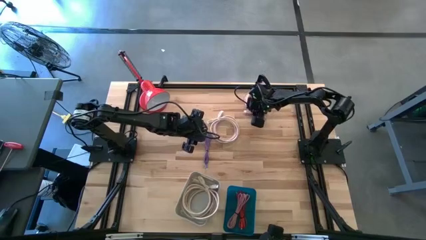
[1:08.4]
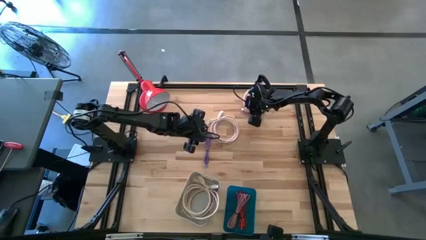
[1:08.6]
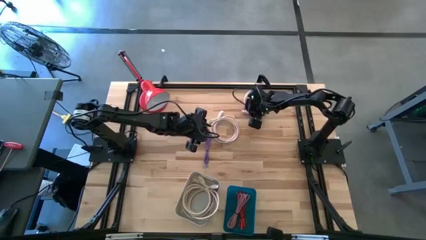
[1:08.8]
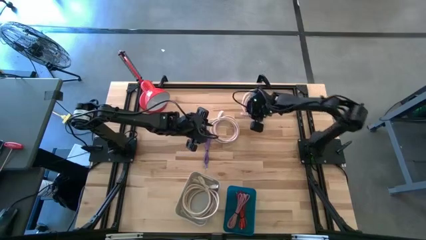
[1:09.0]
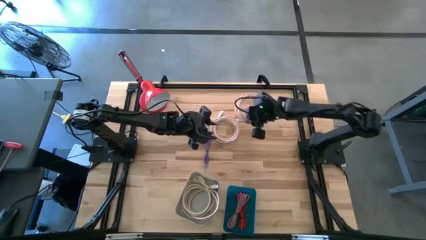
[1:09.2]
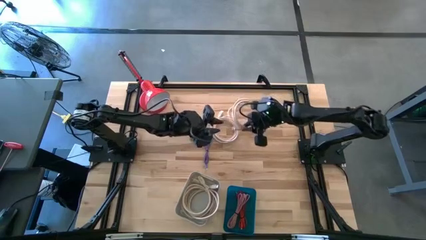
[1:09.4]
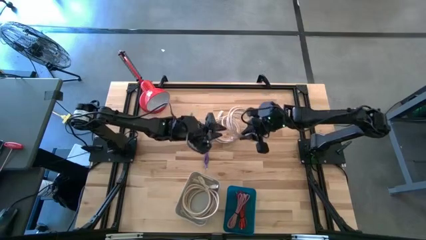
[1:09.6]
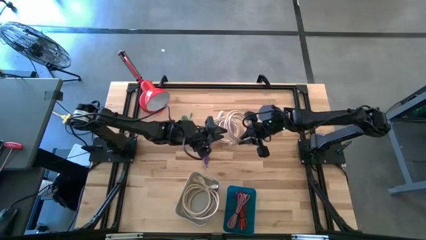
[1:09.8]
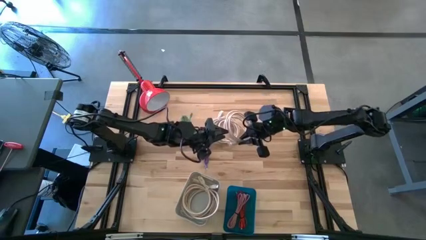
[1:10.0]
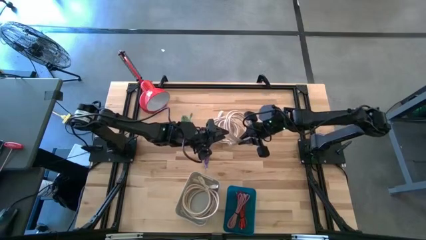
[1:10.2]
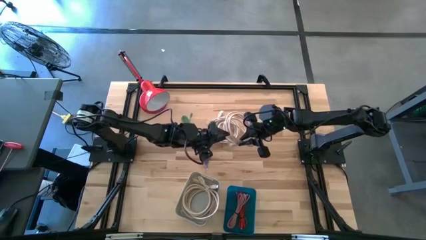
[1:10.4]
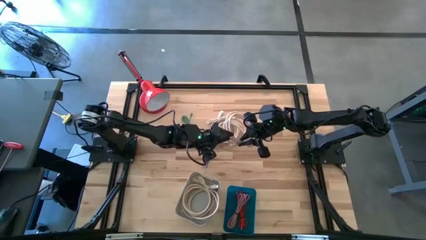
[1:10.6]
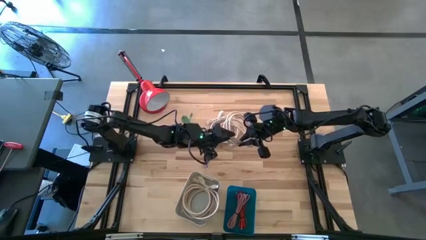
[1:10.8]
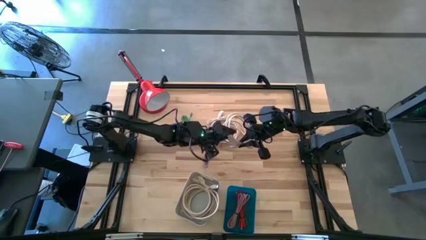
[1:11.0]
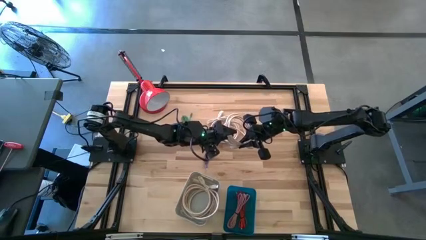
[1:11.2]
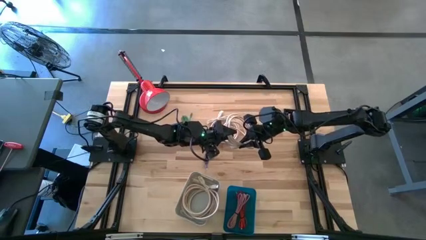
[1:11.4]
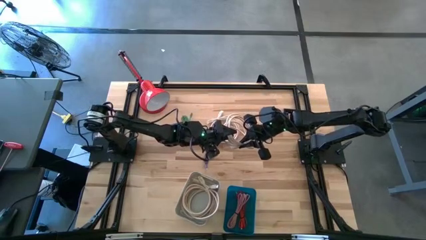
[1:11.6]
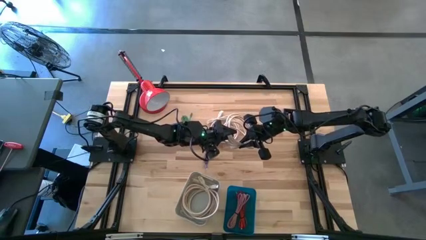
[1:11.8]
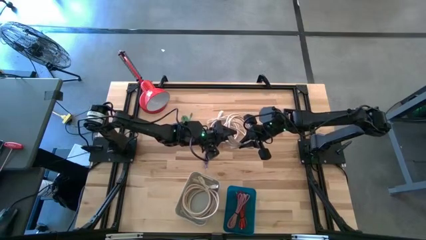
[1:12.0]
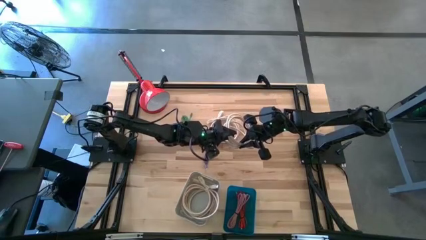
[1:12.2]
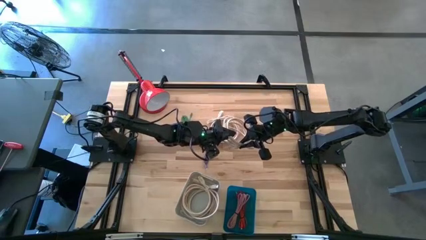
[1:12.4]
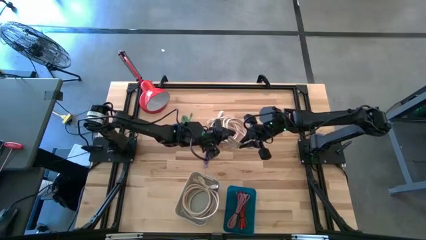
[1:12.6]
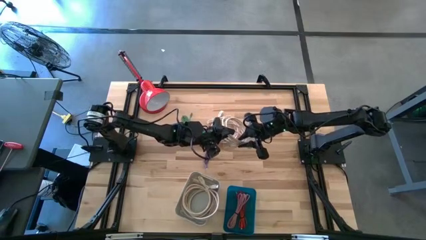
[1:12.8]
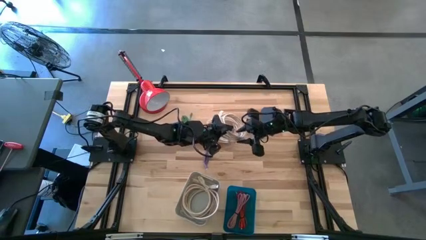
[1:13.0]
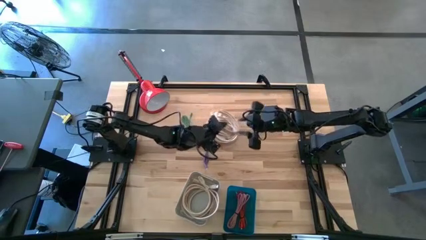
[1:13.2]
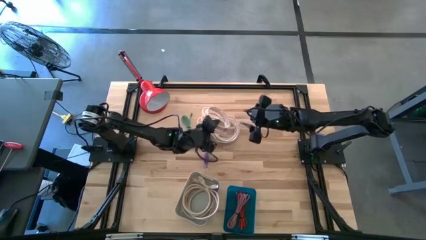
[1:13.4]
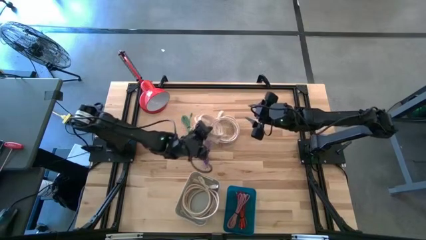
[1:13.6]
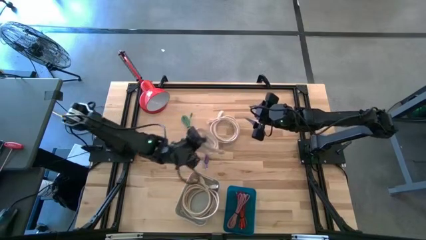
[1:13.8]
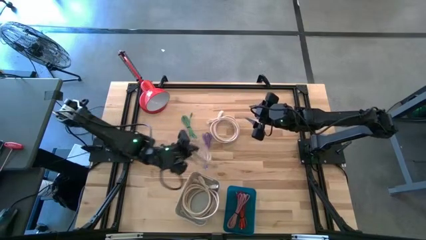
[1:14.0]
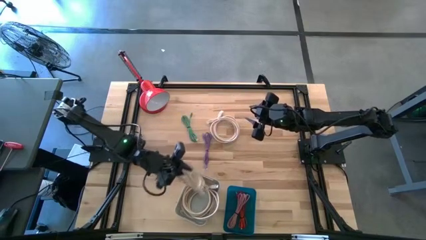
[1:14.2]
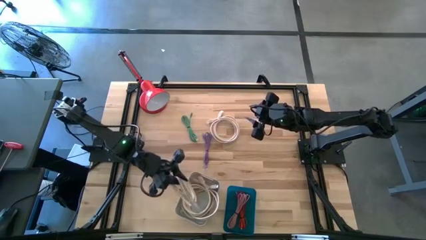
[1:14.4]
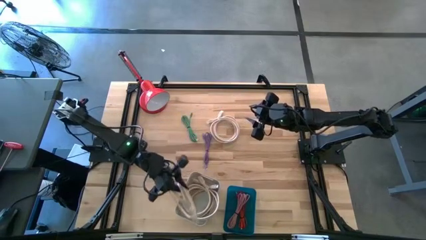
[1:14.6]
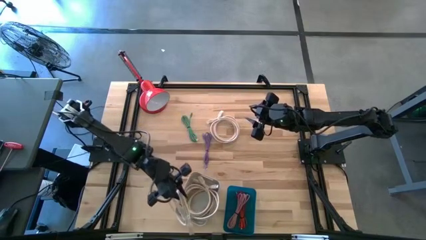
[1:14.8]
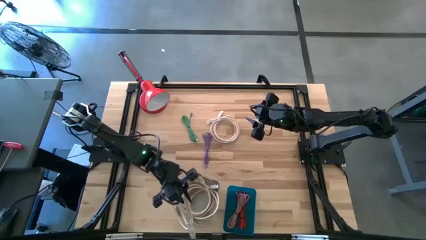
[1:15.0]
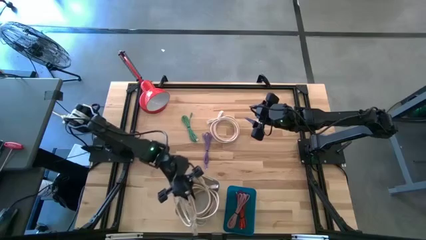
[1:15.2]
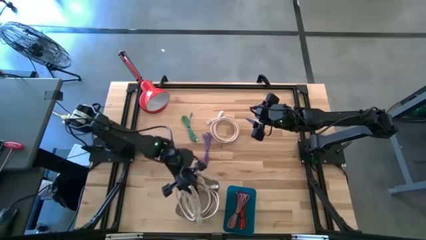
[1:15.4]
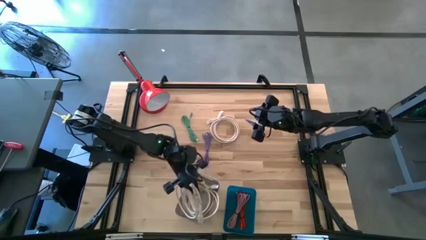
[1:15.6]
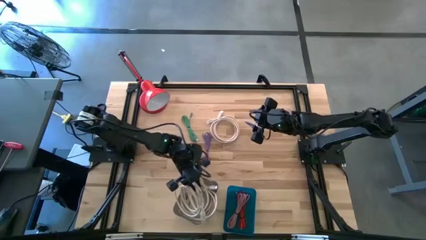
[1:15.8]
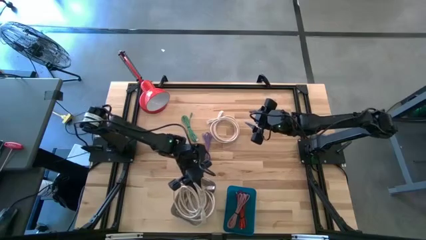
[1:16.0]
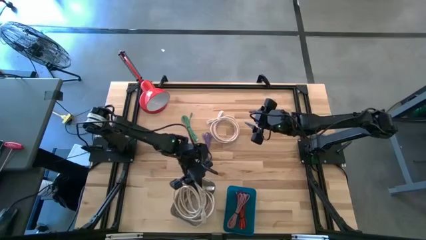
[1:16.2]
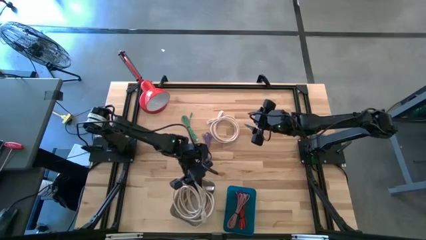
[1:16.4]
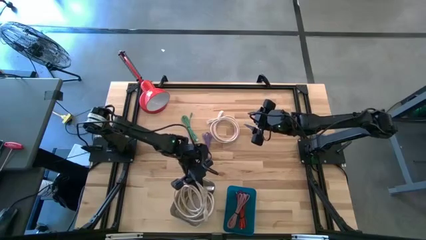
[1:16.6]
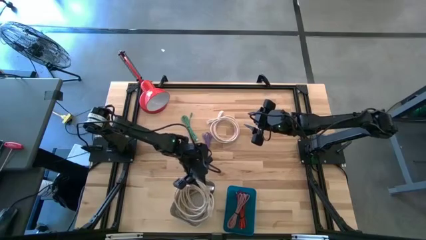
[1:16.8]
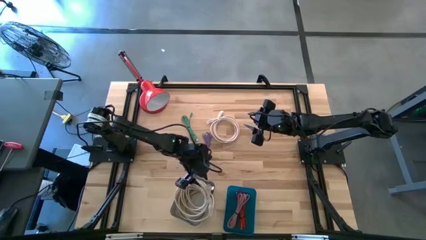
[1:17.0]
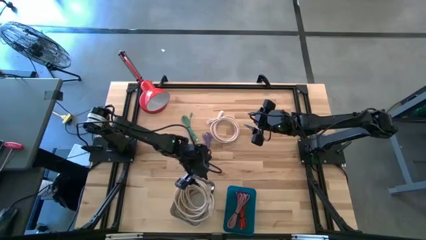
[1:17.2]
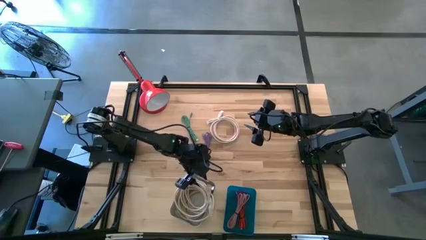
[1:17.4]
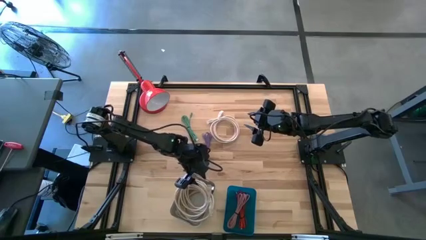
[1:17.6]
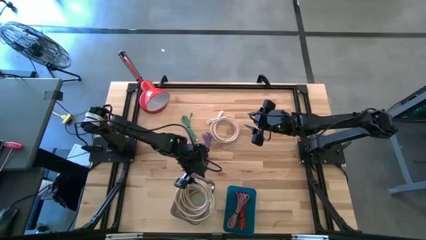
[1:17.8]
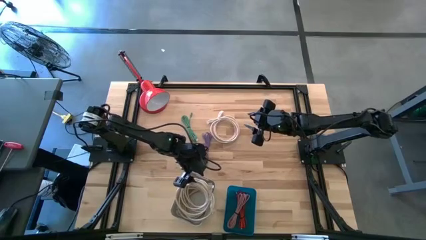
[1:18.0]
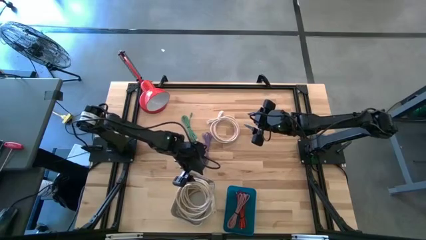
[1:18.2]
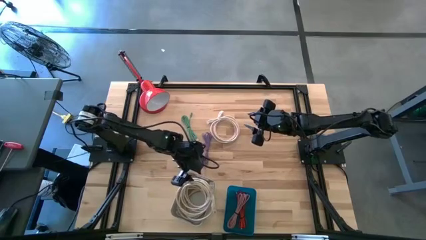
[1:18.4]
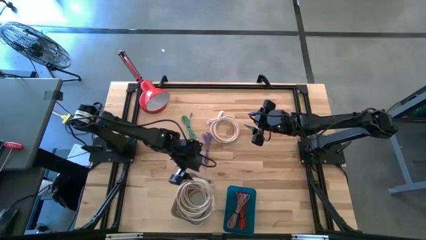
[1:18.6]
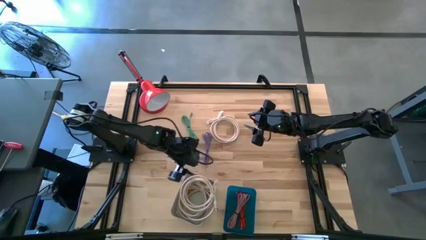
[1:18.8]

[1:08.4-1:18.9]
Task: Pick & Place USB Port
Put the light brown HDMI cable into the white bin

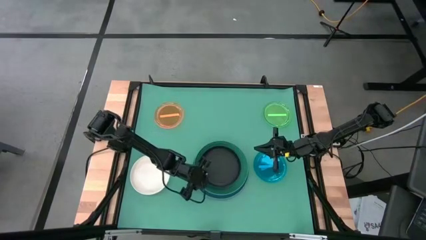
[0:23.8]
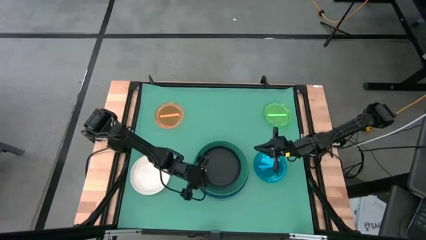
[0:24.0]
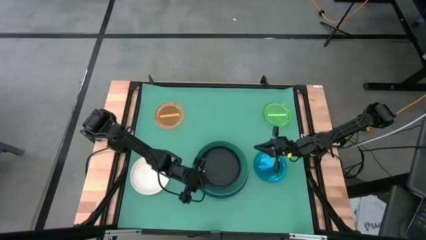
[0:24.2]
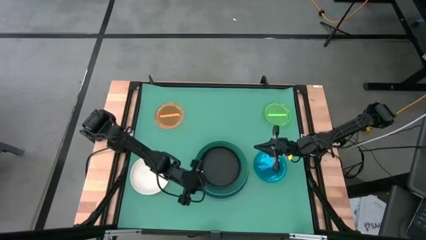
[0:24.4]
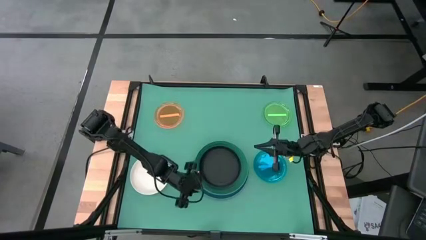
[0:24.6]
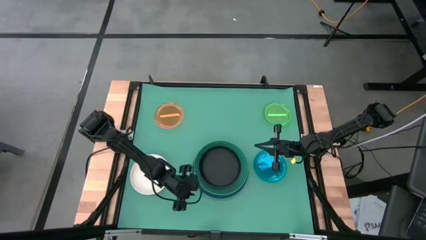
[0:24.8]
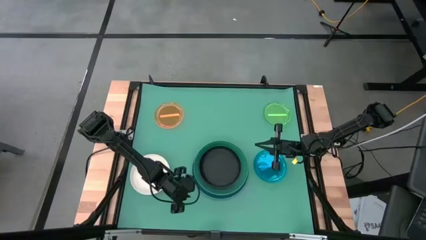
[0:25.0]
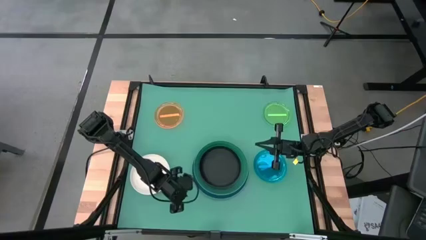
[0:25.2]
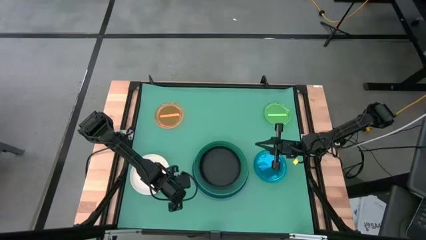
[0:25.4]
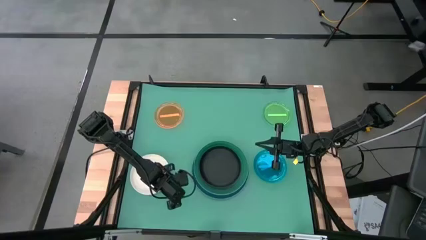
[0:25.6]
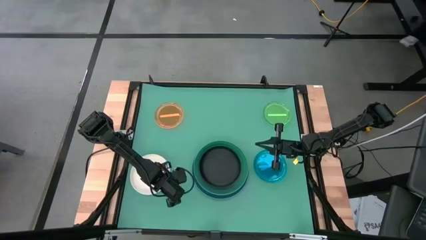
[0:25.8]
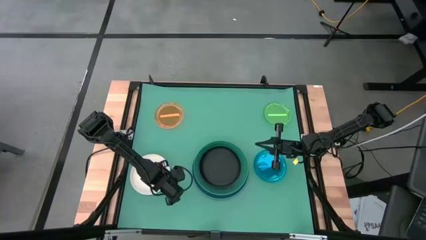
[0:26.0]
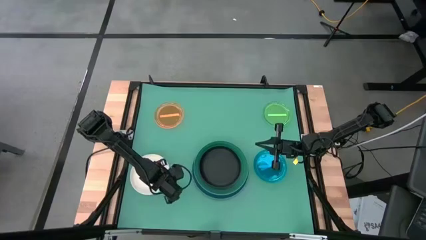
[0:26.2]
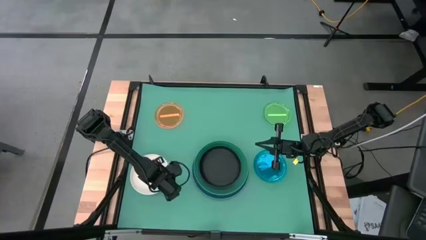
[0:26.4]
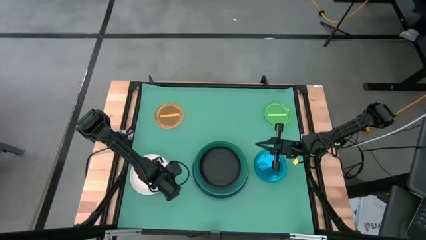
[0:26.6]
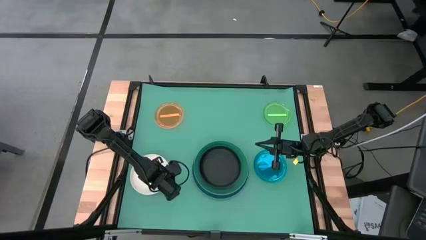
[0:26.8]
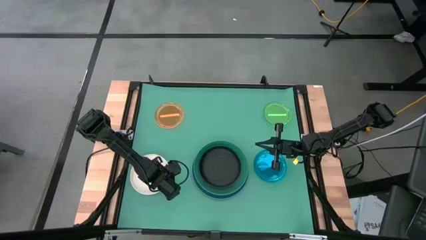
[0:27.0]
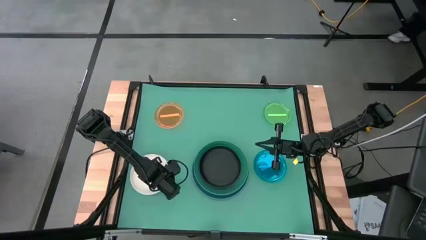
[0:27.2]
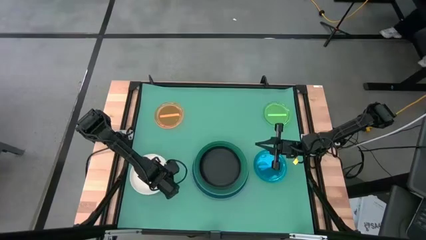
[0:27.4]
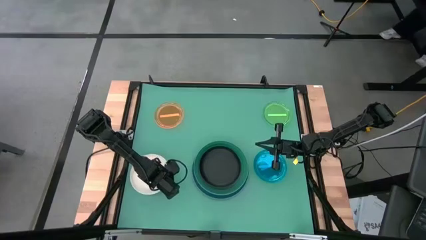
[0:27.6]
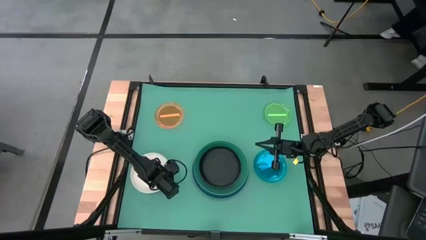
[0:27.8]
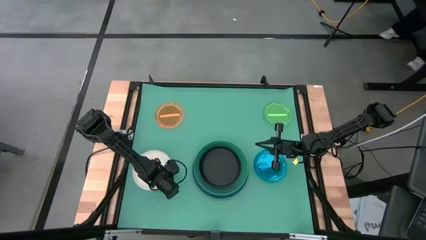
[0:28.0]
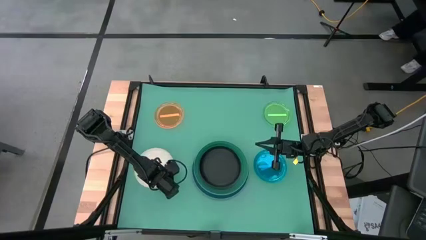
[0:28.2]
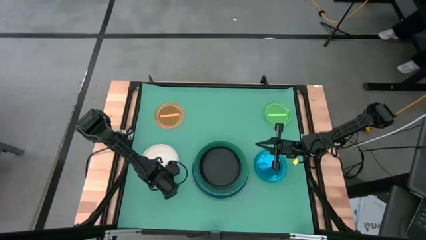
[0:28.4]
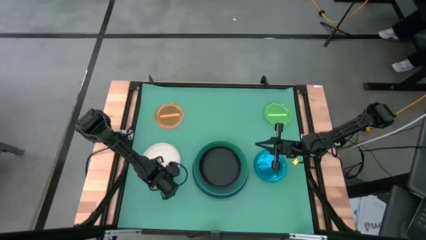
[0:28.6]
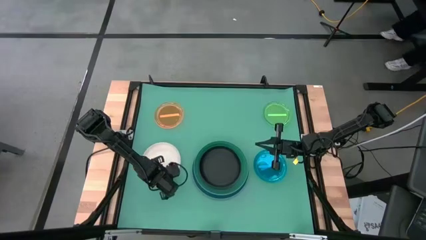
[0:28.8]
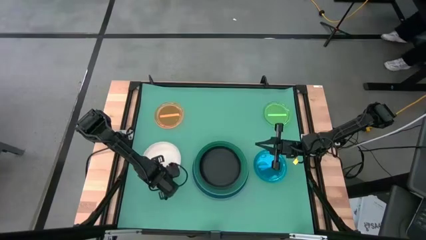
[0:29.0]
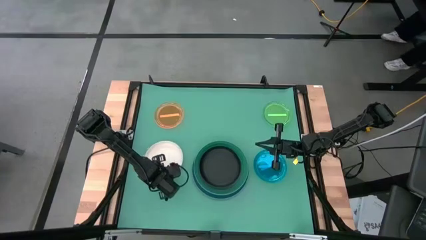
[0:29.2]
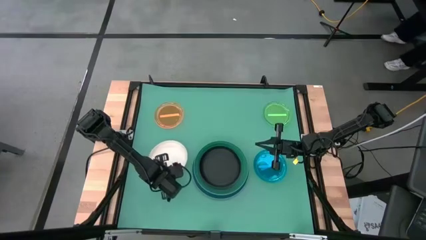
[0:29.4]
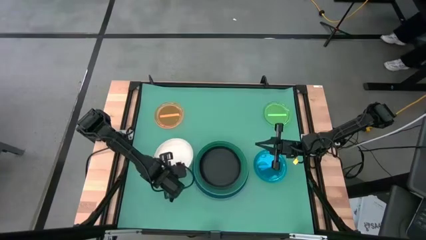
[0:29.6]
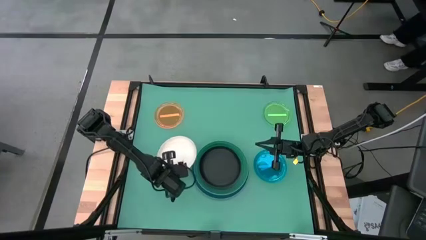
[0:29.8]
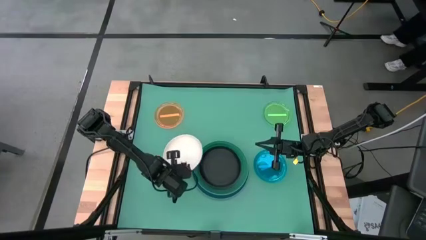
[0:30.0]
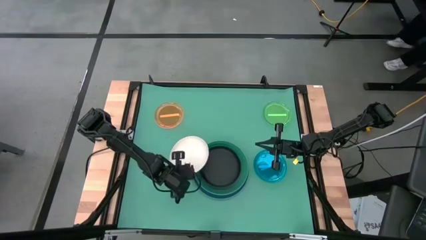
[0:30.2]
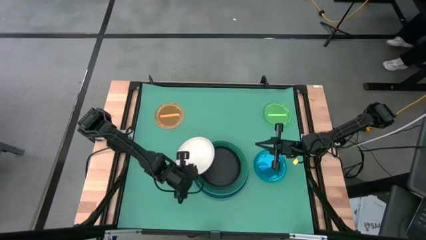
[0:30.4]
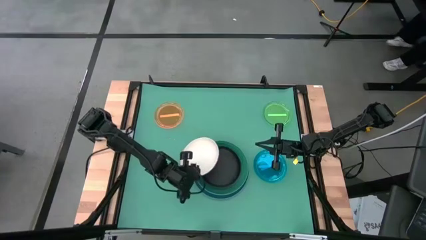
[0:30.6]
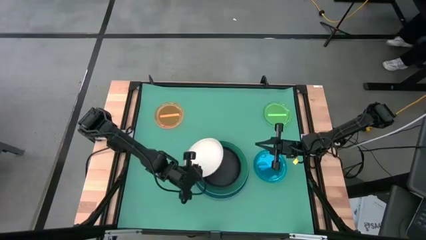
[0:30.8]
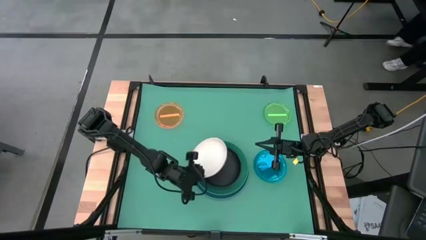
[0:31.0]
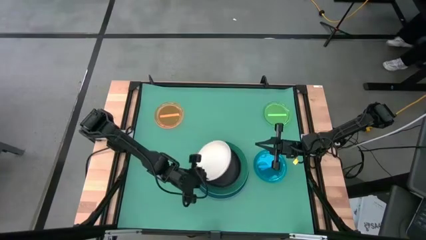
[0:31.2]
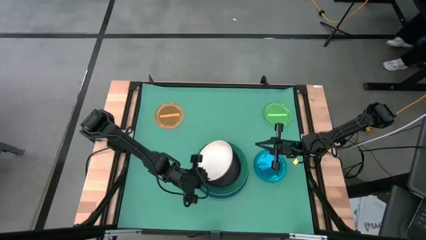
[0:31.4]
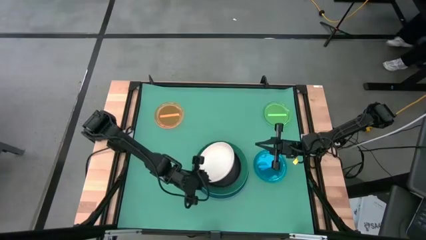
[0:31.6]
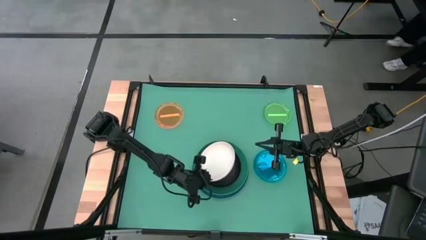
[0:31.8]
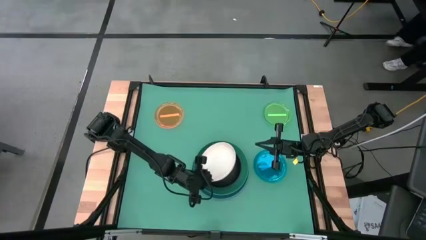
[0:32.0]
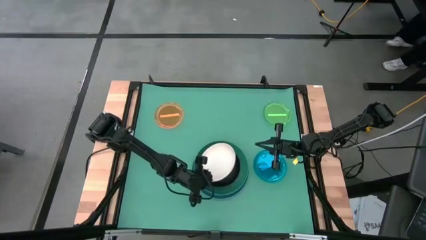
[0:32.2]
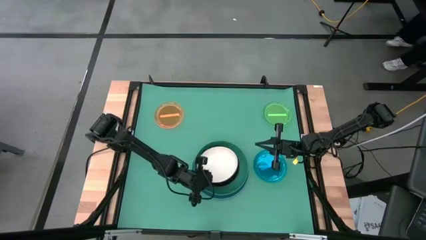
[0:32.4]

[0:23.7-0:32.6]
Task: Stack plastic plates
Stack the white plate on top of the black plate
